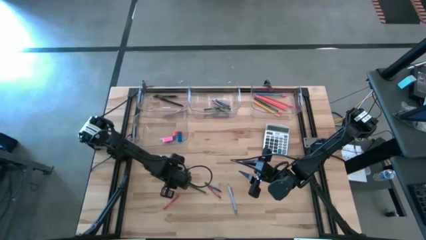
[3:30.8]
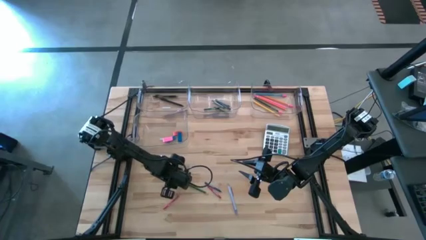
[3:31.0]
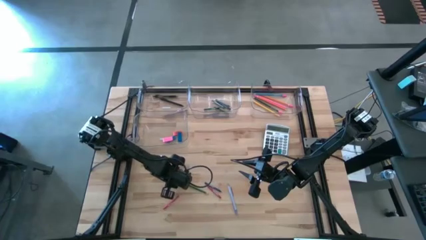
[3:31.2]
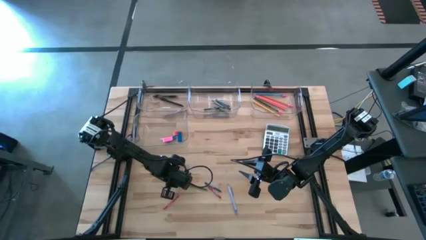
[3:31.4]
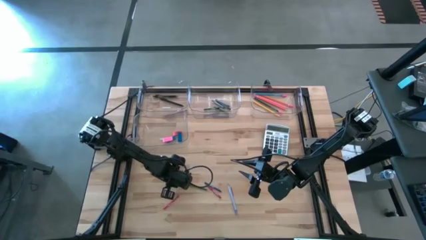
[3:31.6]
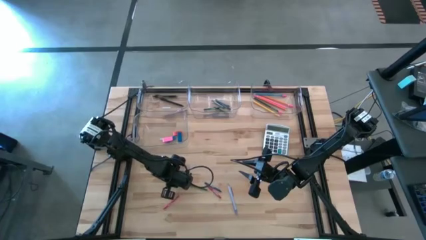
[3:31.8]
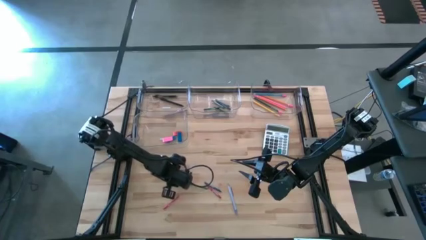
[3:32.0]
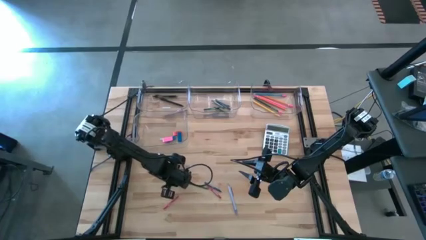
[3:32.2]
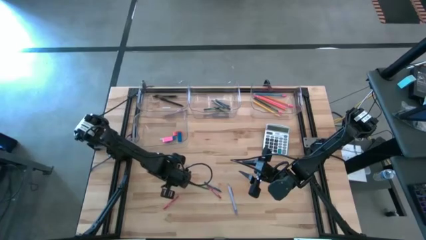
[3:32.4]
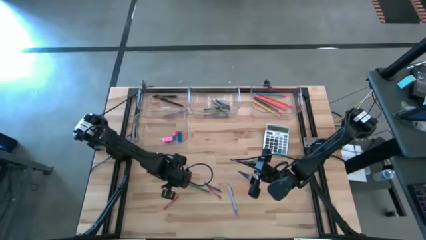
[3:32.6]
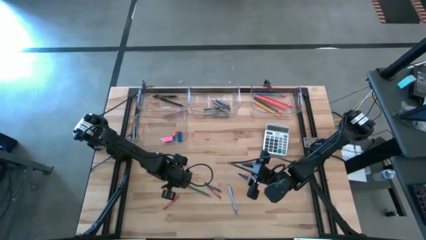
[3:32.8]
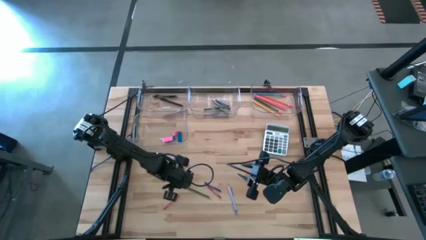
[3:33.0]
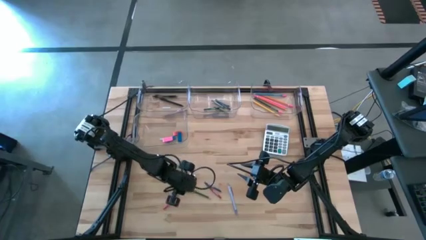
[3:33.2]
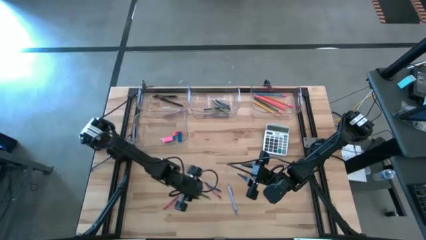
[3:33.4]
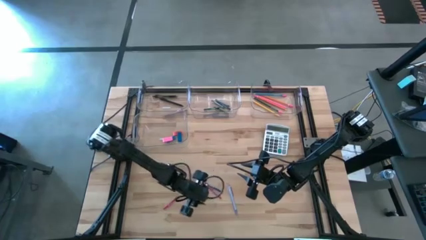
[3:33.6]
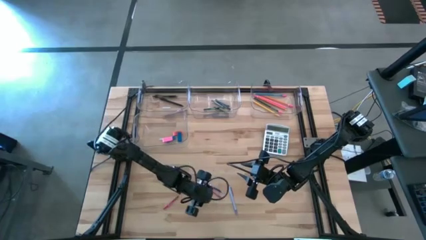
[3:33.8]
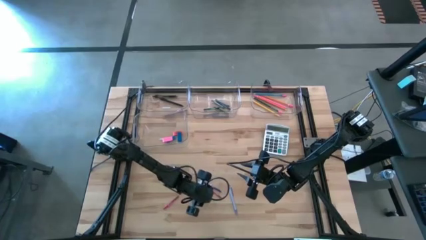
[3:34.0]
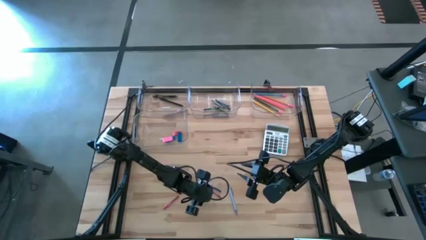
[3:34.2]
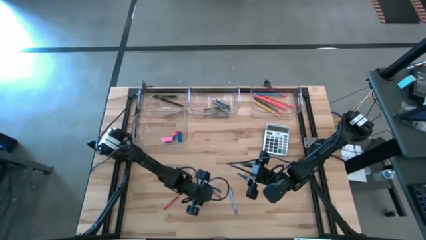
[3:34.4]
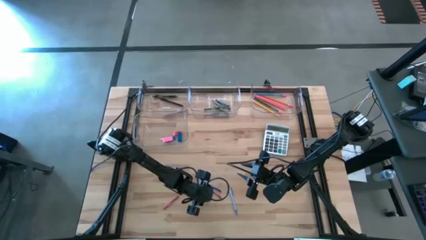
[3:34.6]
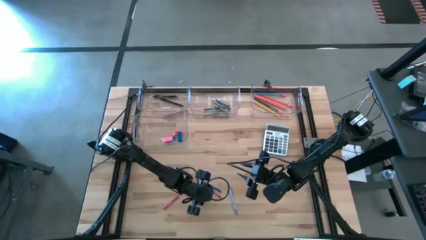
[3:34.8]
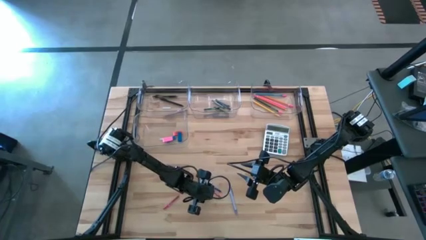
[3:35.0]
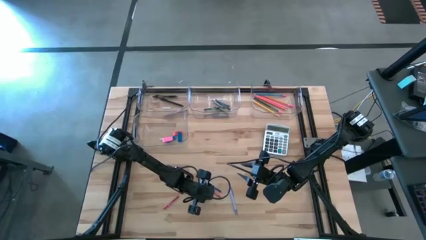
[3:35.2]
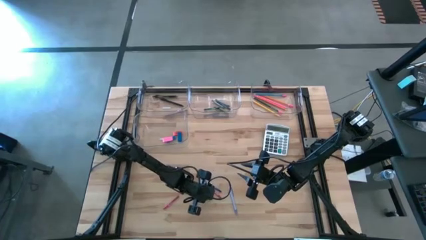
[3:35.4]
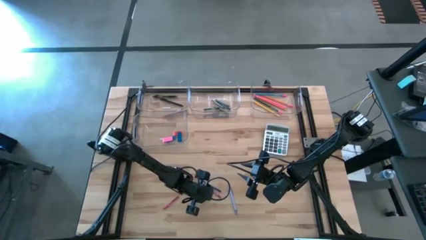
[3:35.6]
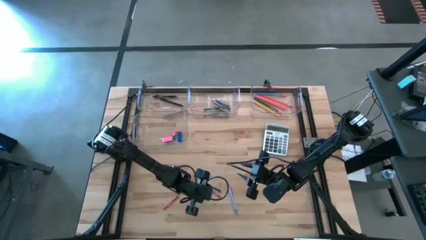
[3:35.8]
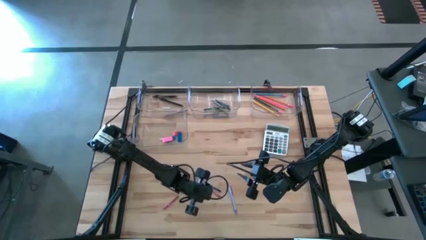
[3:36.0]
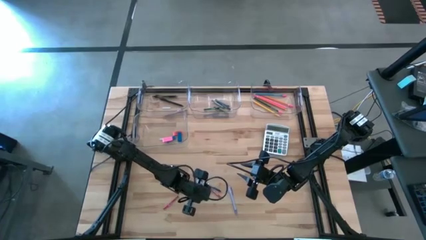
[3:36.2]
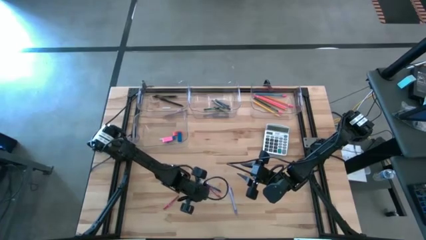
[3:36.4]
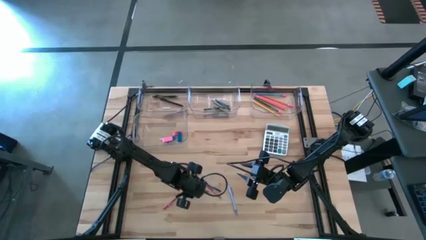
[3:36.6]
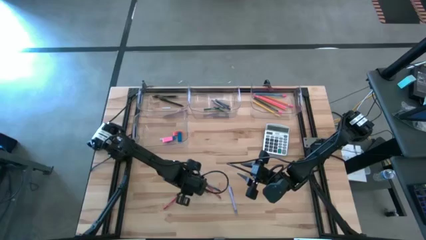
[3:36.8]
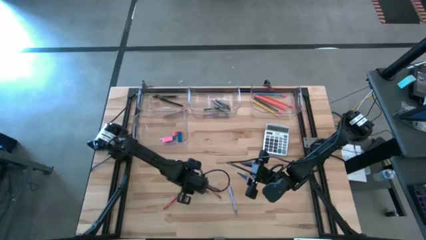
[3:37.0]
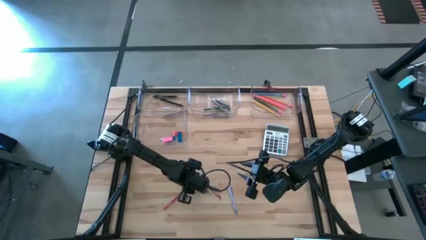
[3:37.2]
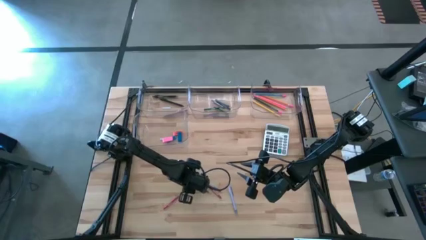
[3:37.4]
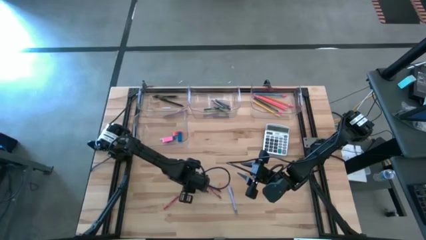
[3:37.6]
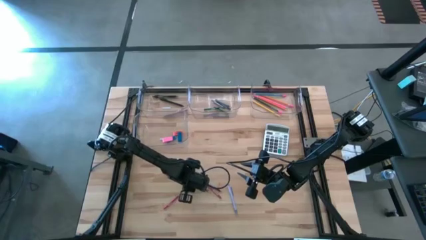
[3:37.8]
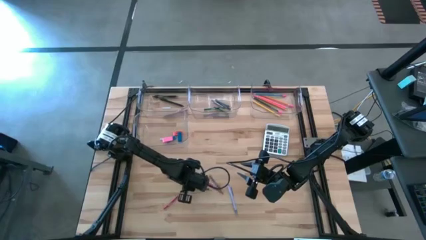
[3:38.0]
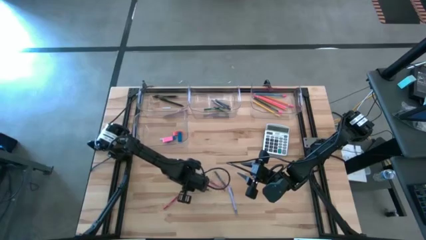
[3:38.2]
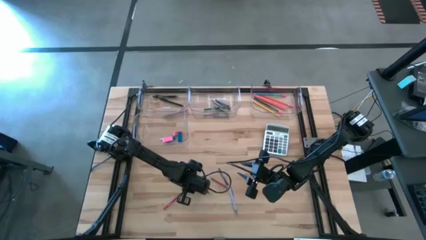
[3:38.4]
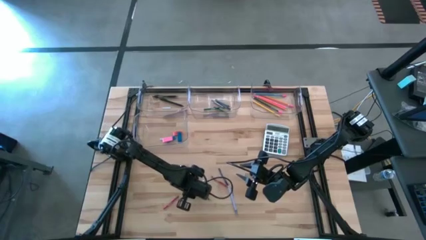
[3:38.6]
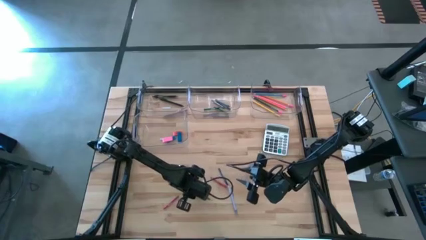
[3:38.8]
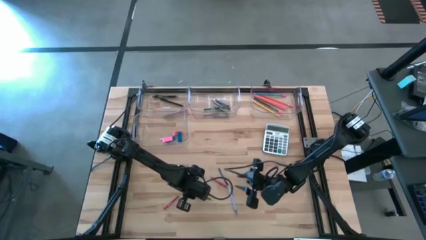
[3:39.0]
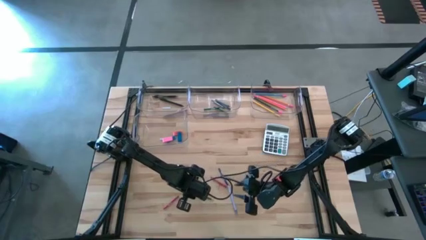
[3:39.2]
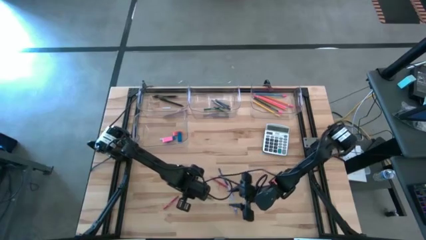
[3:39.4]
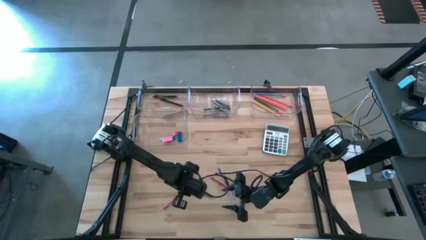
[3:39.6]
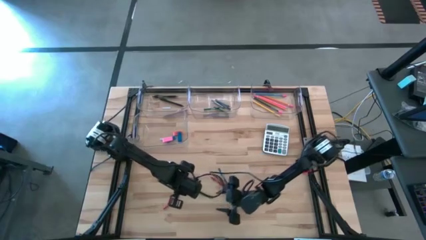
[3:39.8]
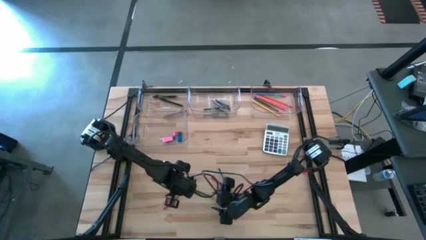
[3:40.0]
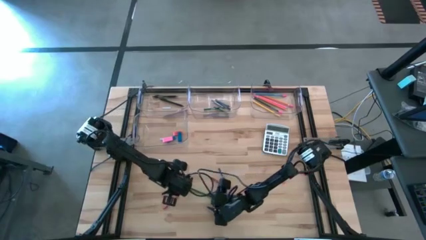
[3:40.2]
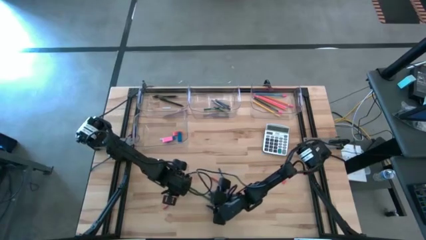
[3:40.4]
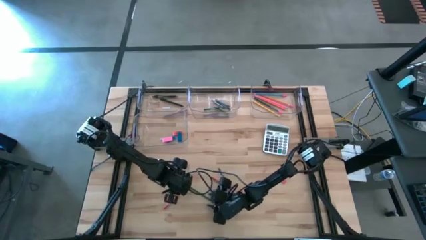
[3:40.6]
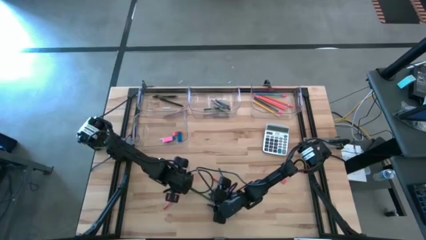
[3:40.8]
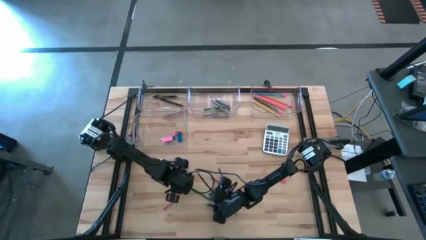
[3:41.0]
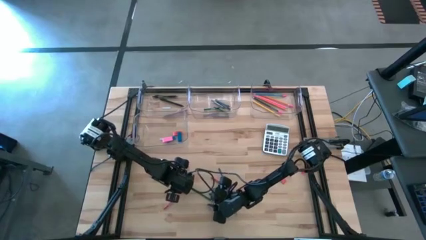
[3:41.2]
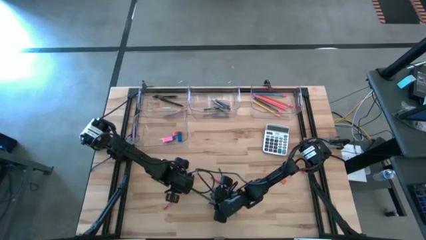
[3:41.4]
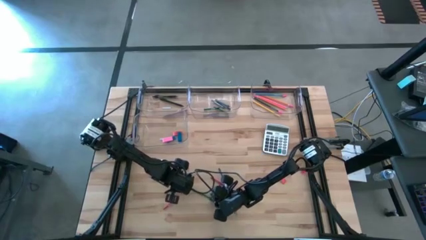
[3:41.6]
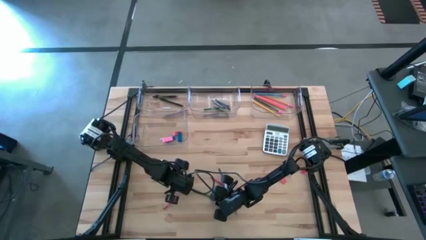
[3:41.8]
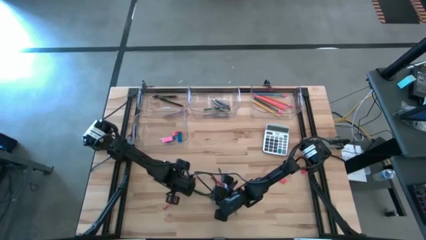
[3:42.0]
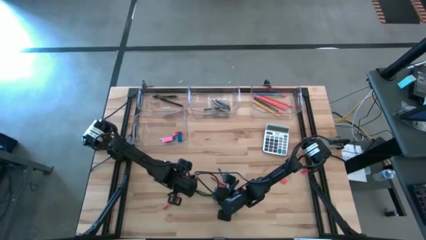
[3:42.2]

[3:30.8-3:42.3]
Task: Sort crayons/erasers/pens/pencils in bins
Put the green pencil into the top right transparent bin

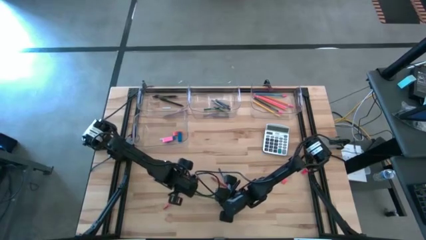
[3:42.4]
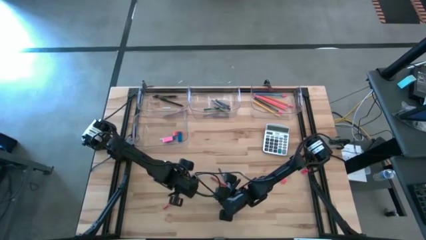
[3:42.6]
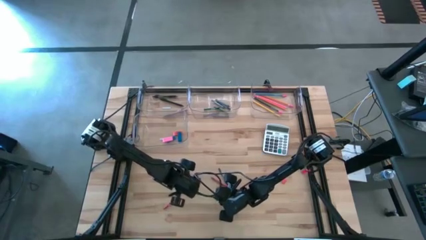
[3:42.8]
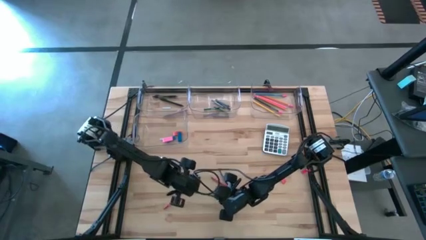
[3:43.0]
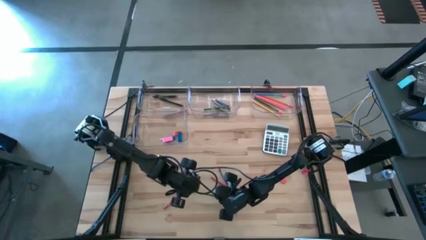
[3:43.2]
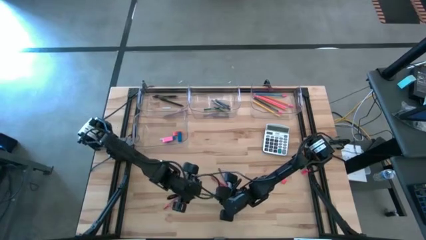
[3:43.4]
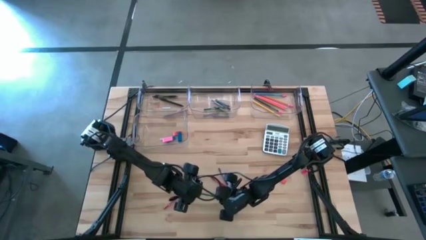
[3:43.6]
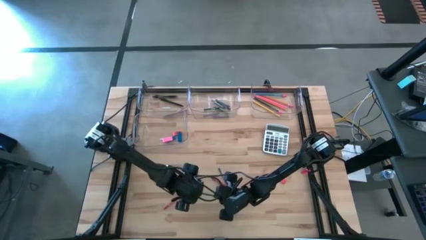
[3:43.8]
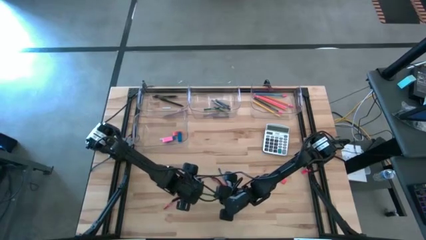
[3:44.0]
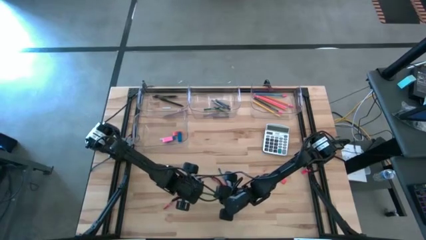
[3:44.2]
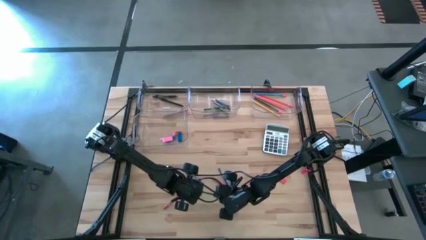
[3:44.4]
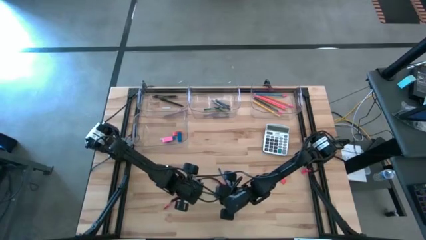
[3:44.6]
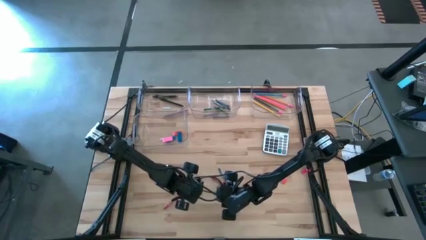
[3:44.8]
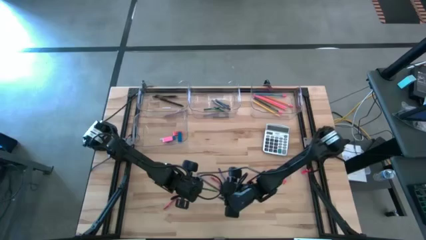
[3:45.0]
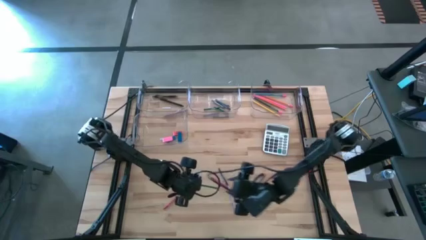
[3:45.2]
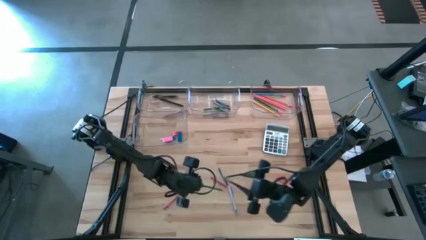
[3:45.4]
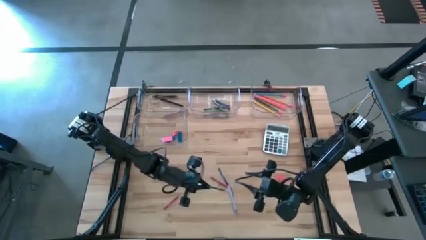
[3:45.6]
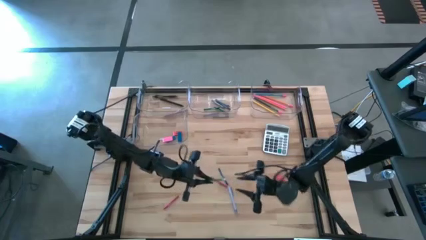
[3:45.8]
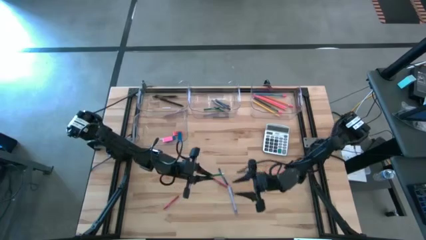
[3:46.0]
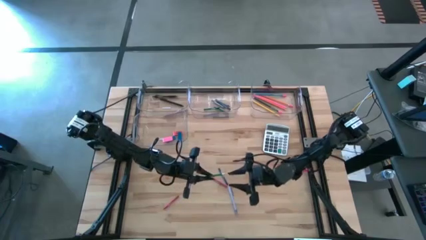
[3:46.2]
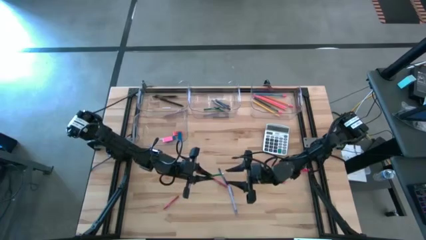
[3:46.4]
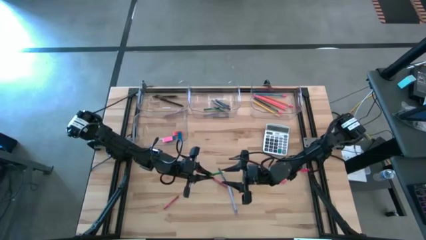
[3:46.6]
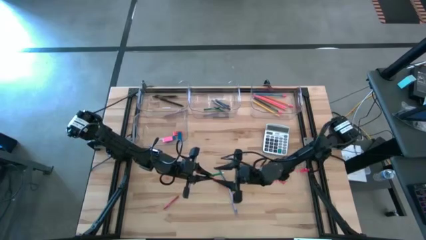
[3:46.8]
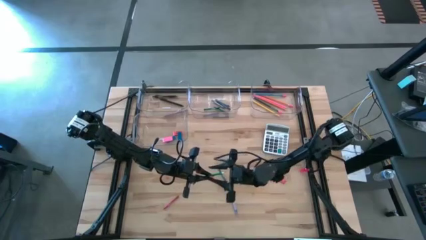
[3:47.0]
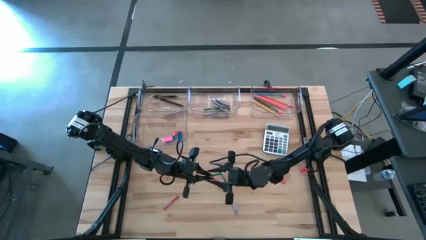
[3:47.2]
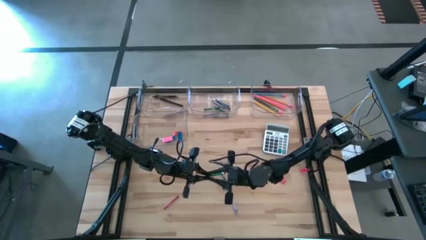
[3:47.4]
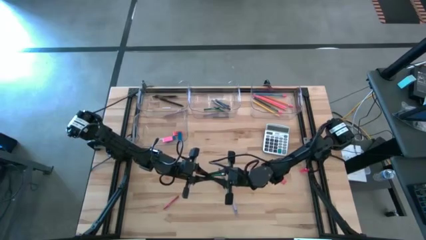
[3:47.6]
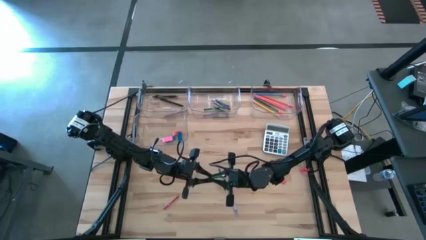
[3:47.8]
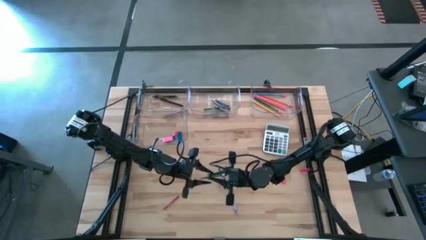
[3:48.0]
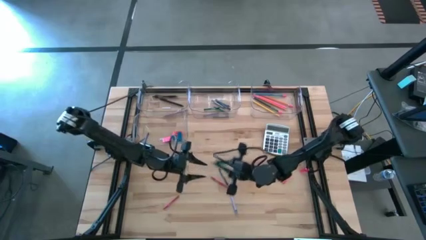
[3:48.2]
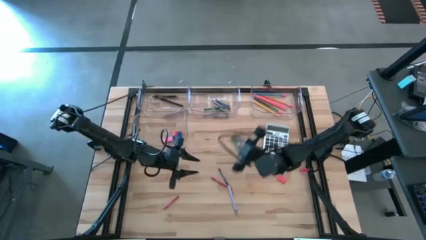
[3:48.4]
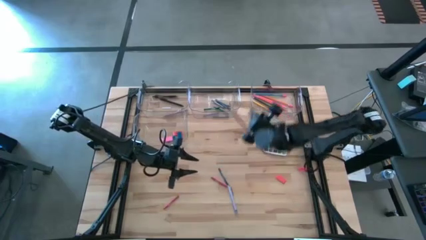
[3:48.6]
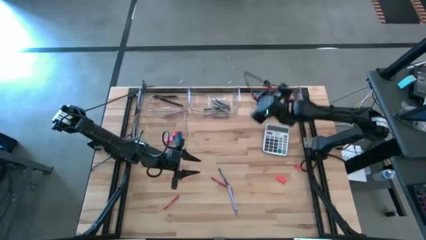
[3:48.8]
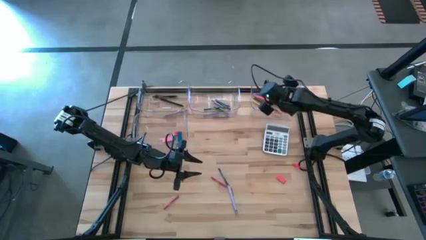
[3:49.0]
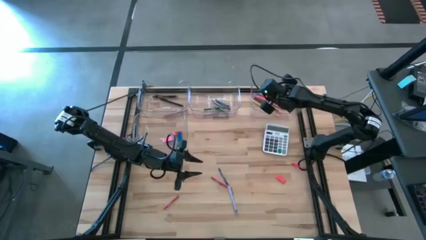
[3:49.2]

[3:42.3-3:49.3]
Put the green pencil into the top right transparent bin
